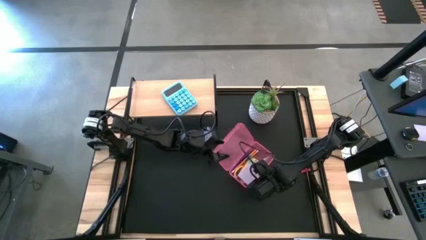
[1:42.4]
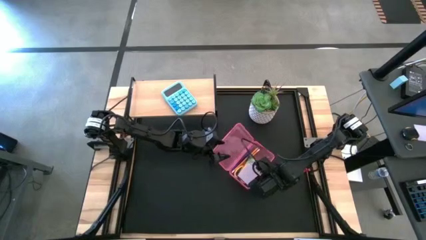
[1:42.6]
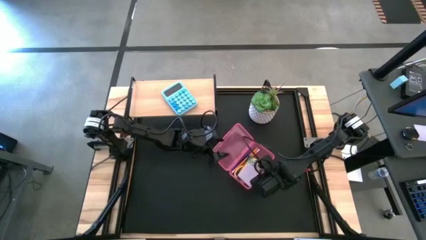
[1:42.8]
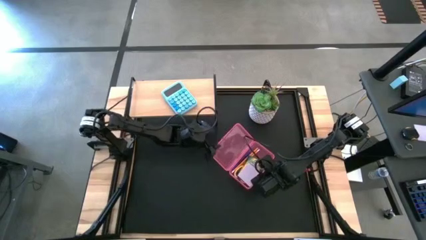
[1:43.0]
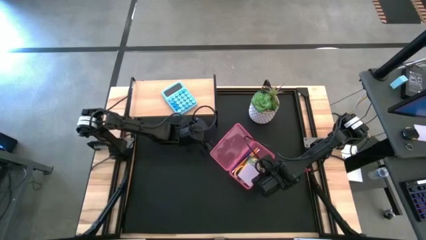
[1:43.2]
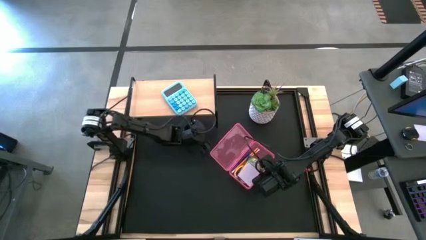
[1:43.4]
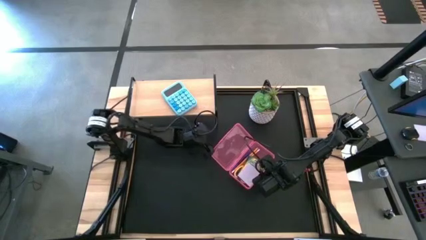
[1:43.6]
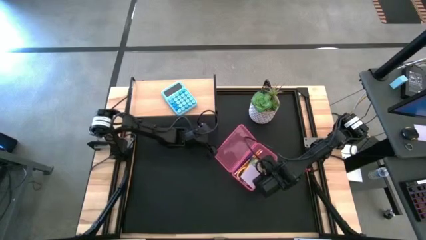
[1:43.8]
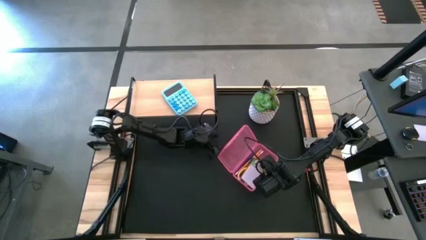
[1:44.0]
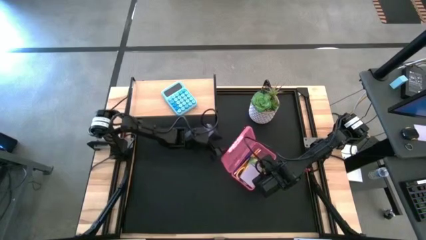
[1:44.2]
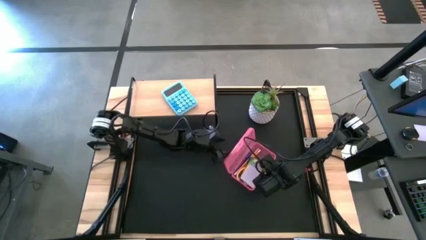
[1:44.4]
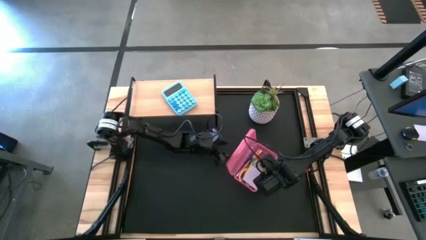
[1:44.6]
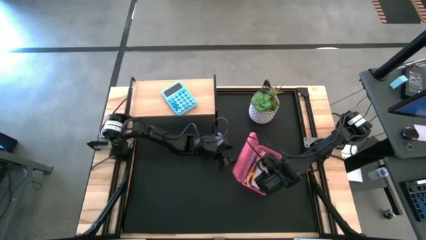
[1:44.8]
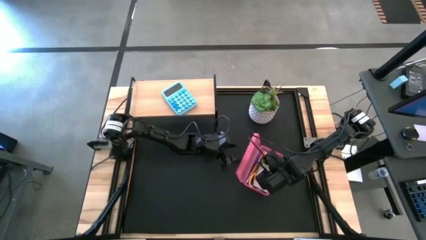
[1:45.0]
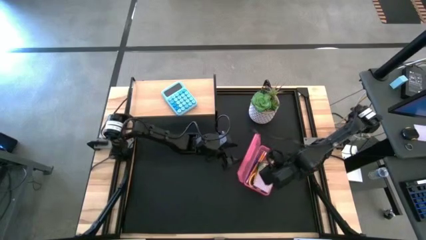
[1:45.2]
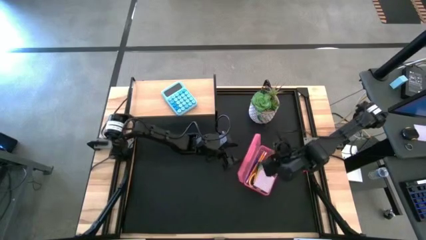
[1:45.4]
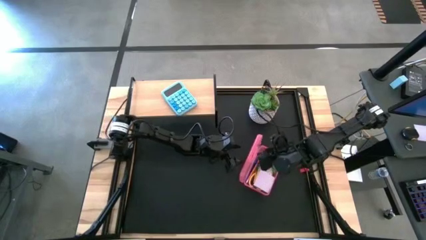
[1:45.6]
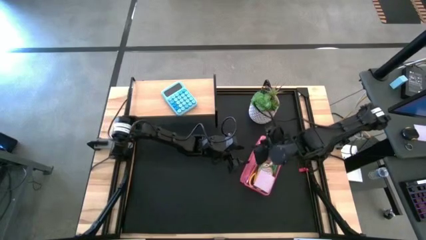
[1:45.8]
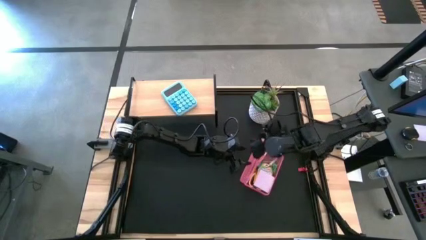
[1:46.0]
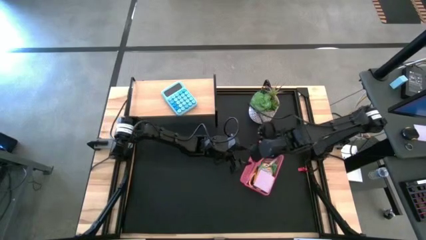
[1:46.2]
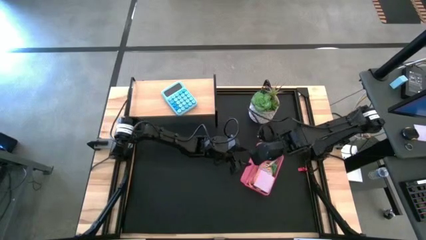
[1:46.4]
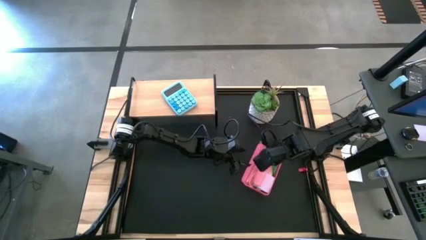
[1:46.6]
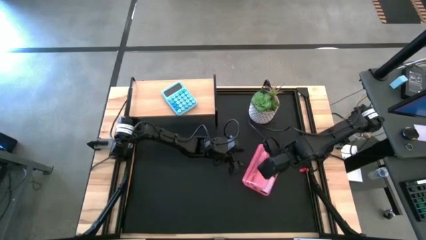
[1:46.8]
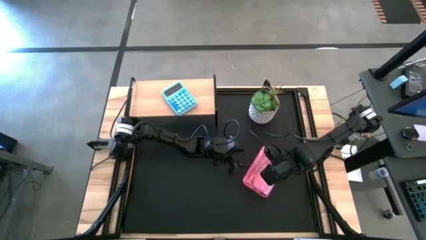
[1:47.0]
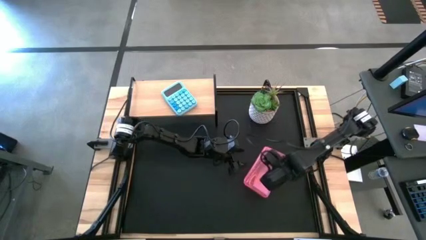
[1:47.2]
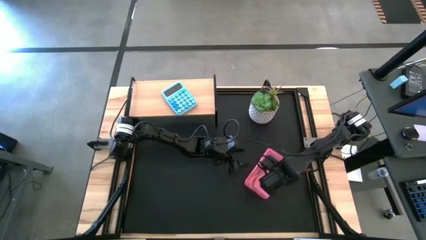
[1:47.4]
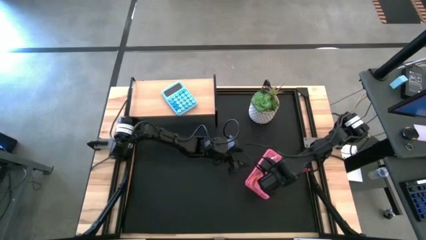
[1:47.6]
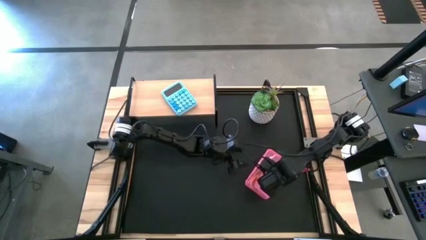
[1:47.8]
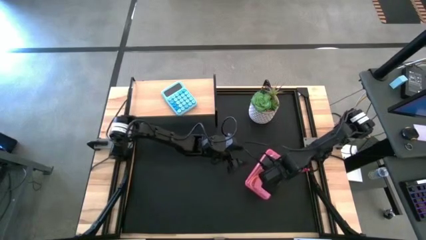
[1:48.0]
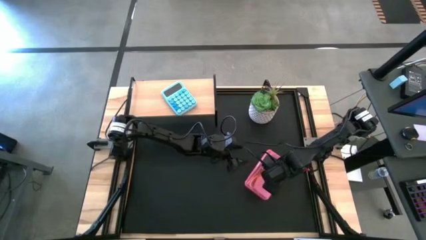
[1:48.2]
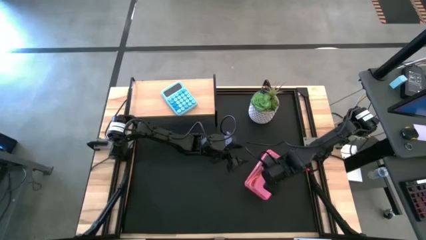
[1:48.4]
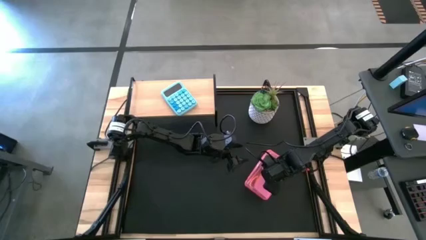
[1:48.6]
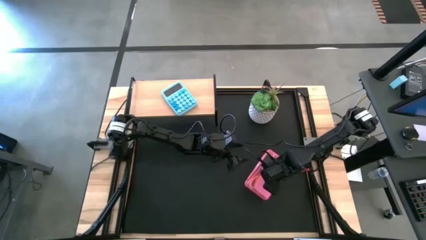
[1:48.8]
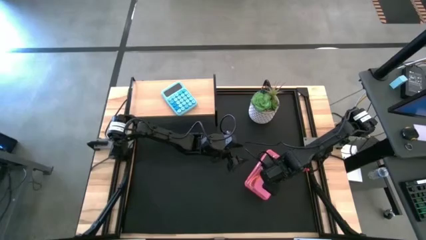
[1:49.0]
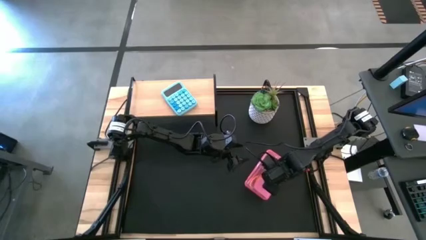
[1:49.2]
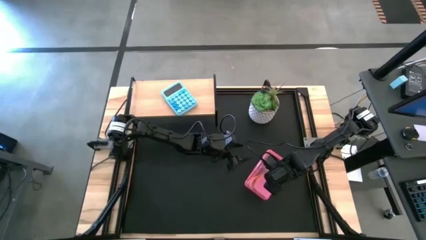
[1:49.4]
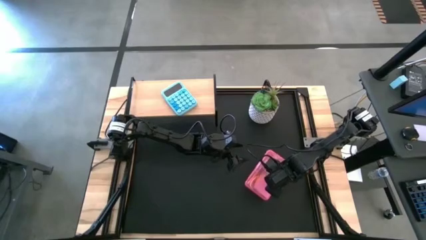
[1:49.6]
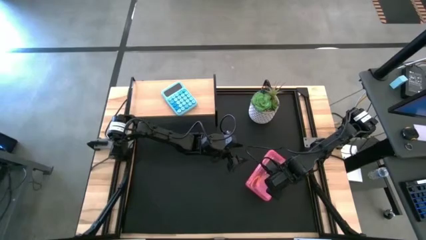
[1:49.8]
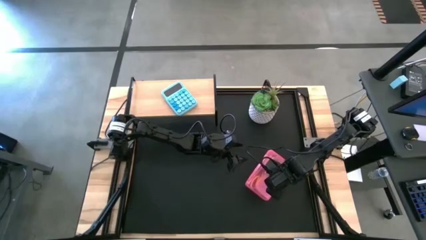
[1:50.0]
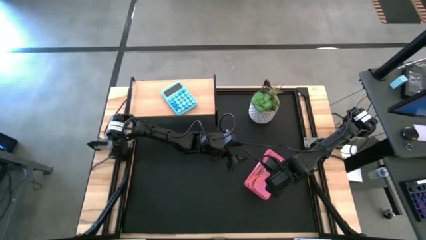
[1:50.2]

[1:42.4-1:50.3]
Task: Pack school essentials
Close the pink supply box

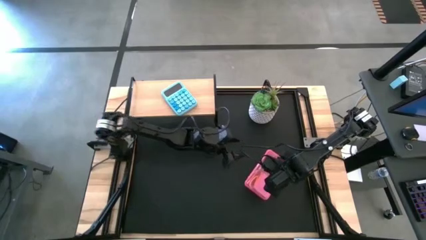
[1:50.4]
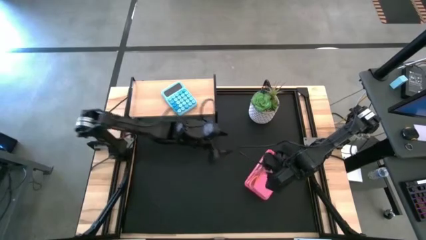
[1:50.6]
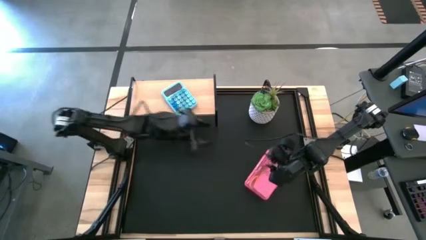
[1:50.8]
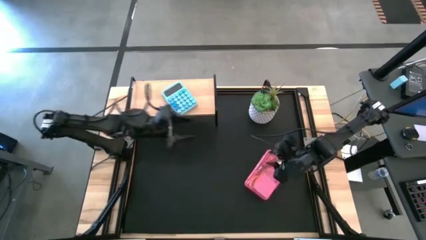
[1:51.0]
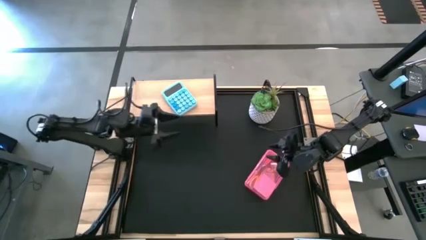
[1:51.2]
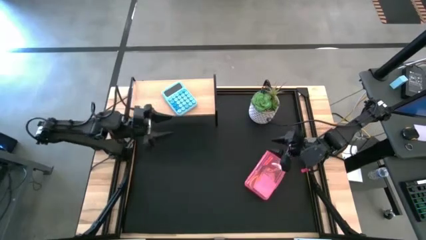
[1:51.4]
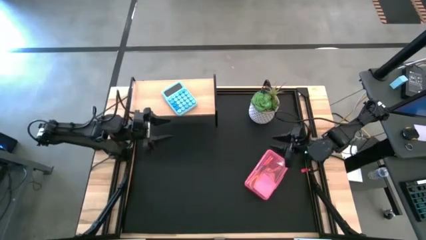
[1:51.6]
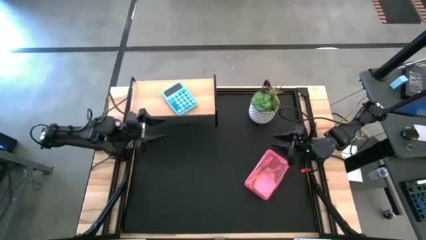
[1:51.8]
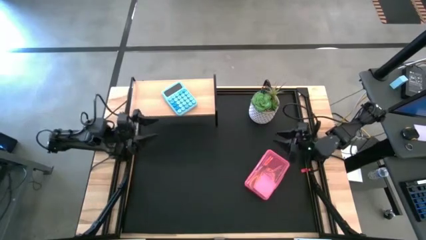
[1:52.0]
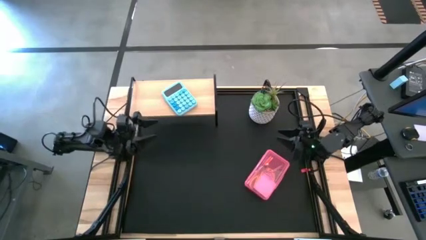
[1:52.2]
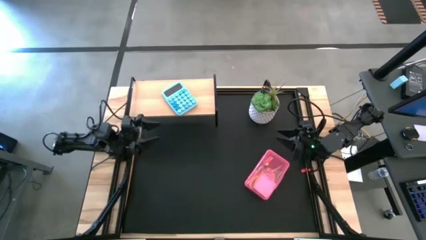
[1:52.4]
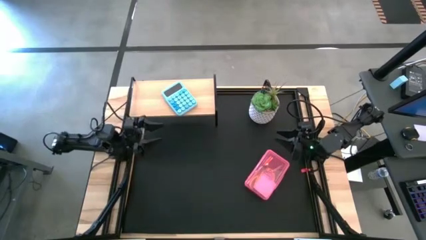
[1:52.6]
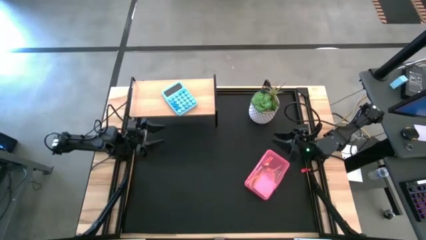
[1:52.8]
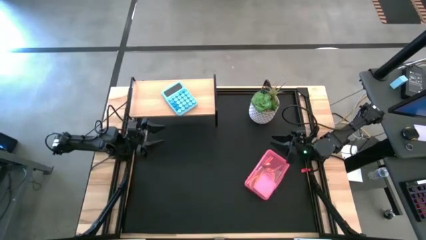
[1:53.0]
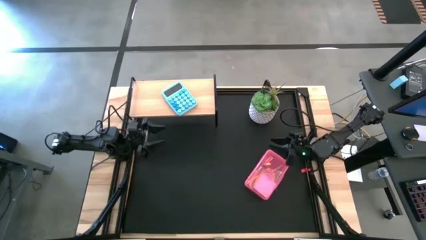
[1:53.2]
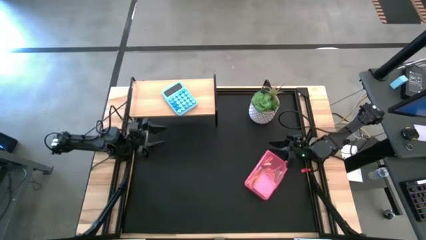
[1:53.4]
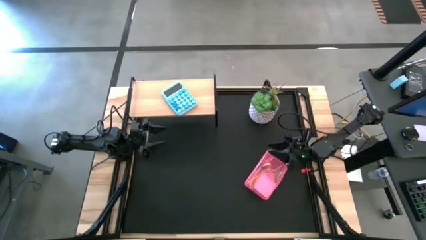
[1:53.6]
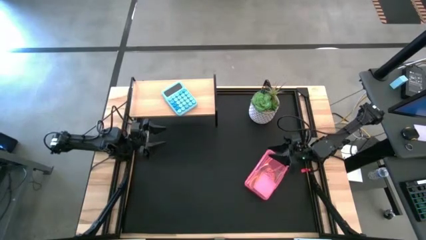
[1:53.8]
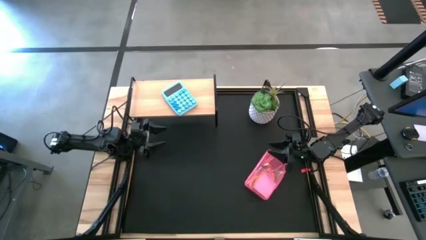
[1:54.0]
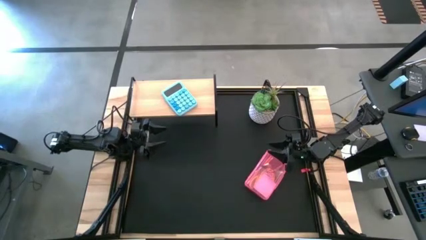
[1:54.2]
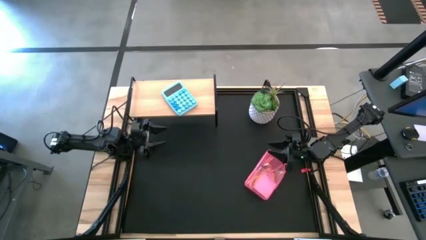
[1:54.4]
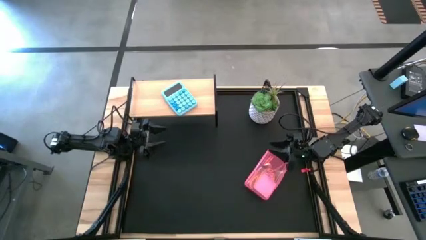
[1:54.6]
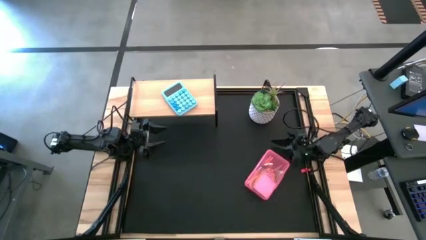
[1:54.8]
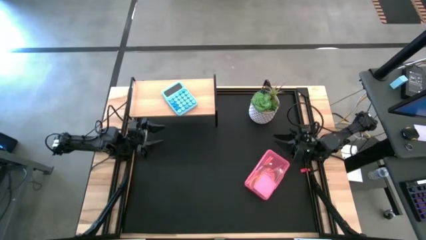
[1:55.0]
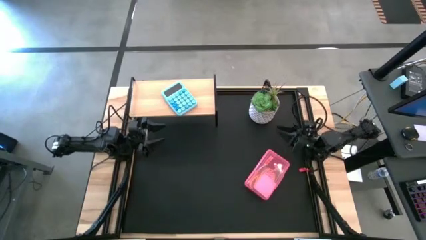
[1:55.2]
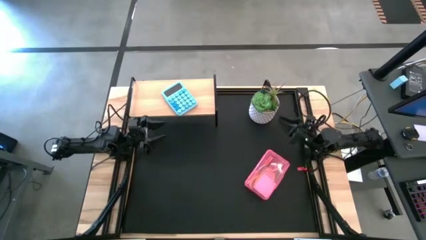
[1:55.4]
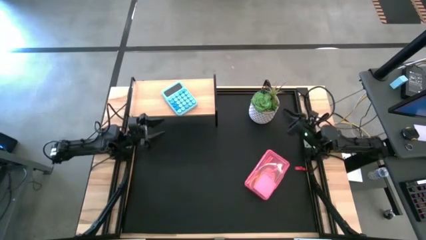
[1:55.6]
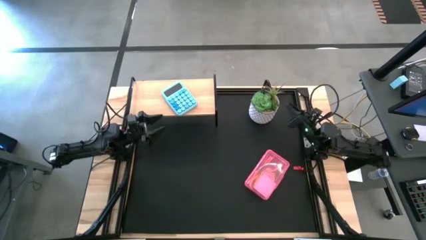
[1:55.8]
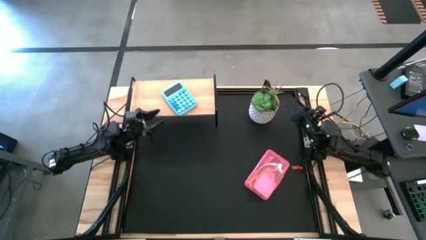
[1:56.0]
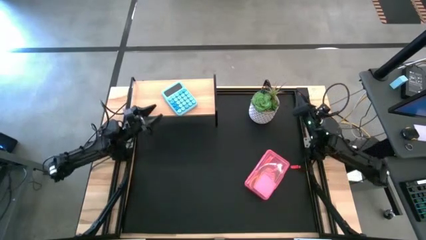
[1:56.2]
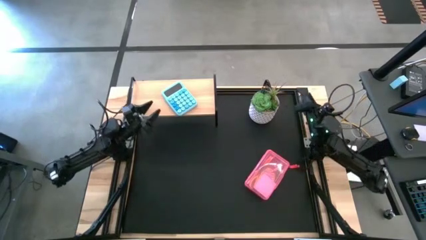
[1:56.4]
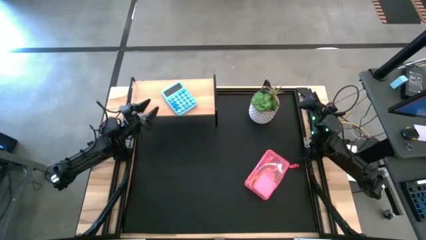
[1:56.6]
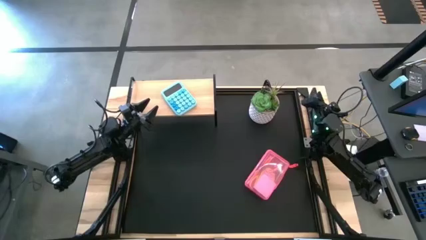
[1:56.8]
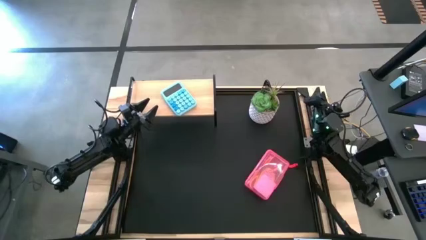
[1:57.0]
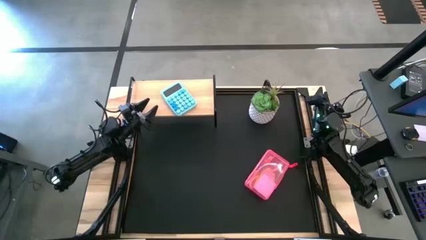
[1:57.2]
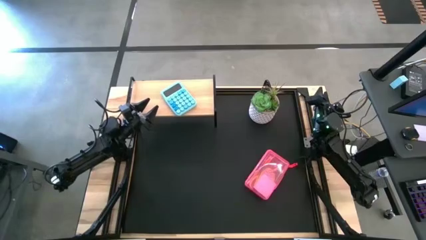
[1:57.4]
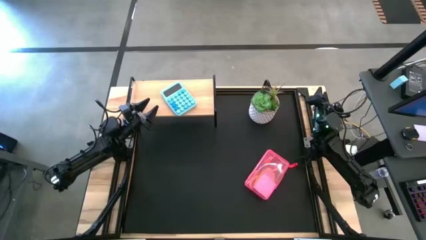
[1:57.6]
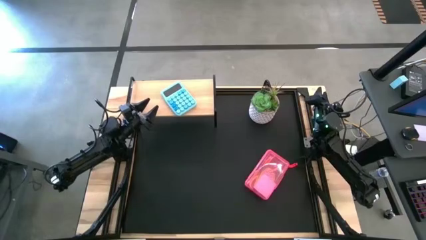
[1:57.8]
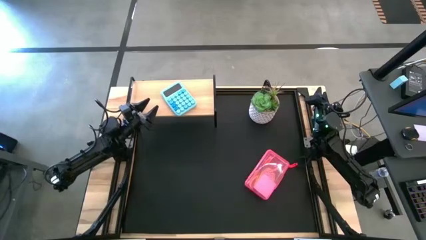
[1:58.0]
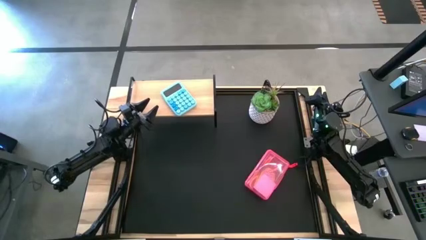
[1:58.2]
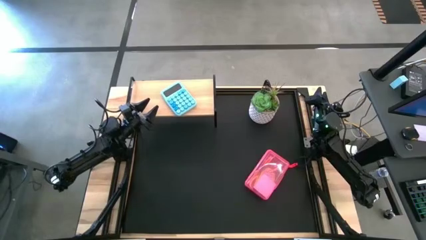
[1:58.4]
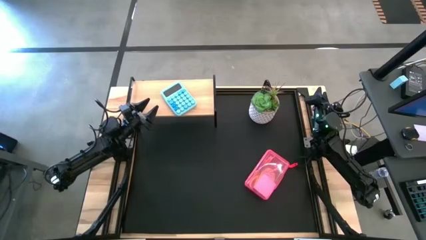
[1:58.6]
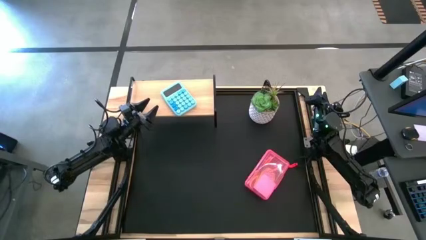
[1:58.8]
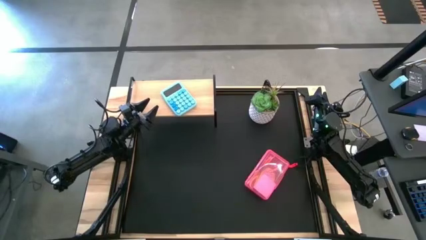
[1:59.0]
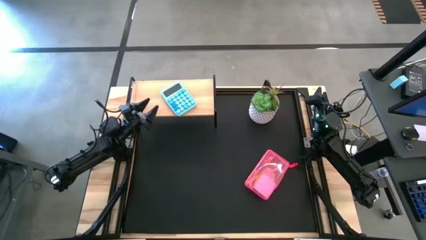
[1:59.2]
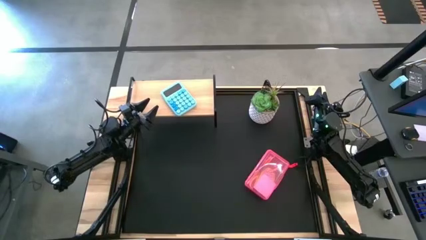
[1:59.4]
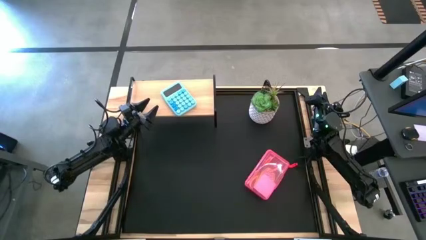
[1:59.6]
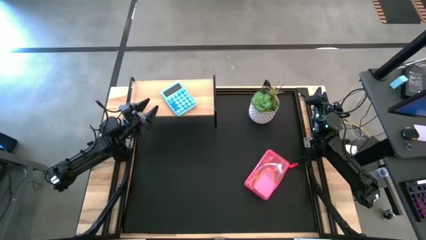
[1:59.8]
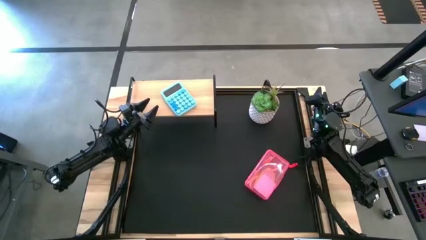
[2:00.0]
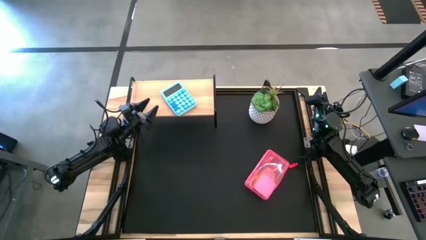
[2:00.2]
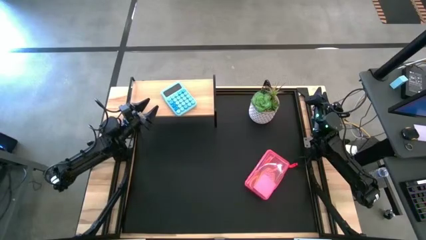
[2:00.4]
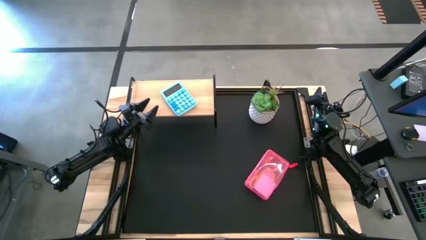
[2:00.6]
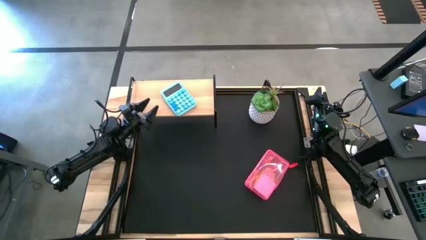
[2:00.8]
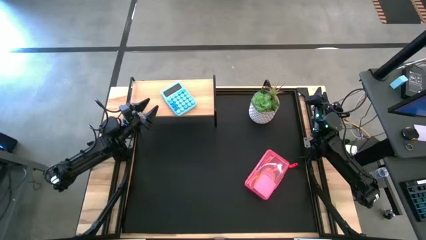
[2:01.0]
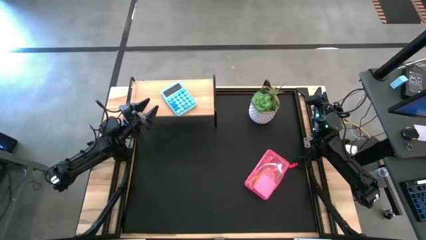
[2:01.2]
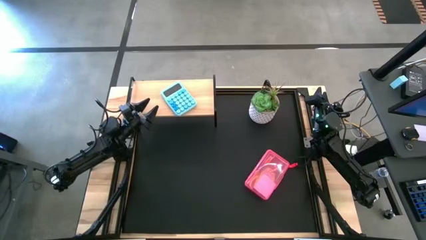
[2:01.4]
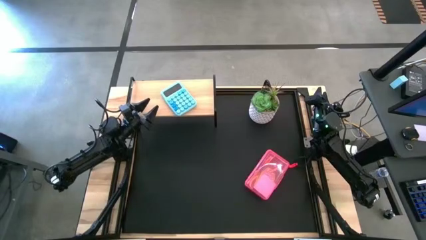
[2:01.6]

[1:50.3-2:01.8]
Return to Home Position
